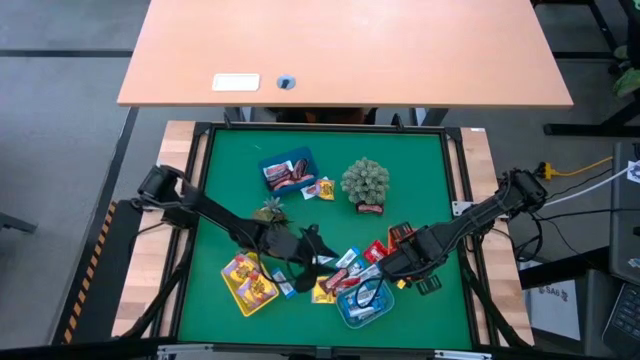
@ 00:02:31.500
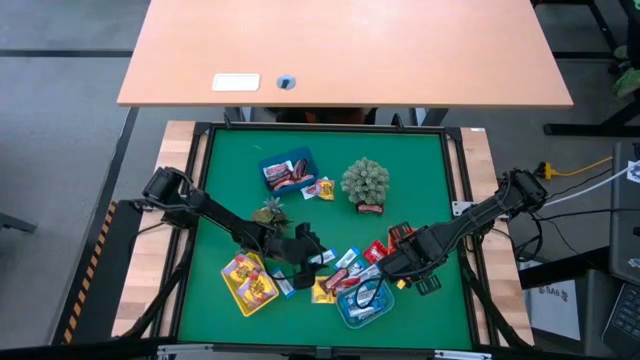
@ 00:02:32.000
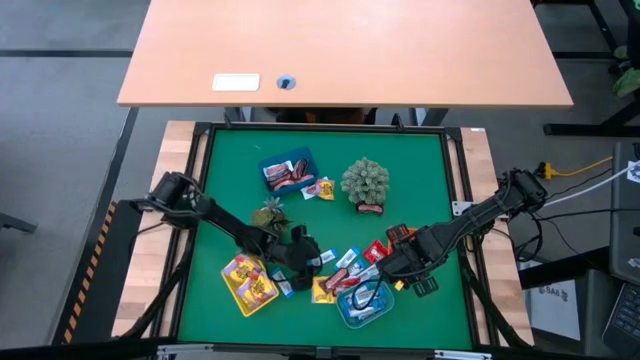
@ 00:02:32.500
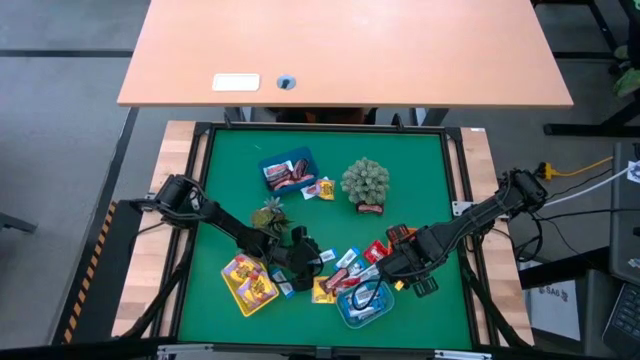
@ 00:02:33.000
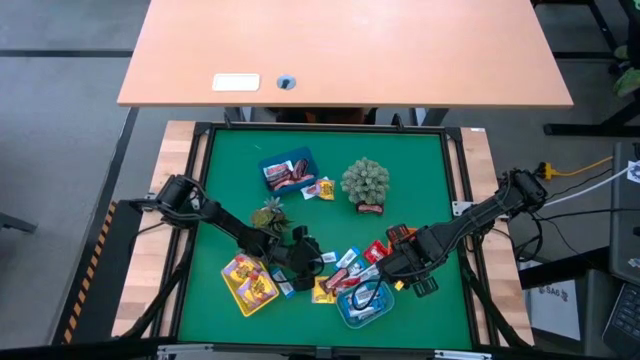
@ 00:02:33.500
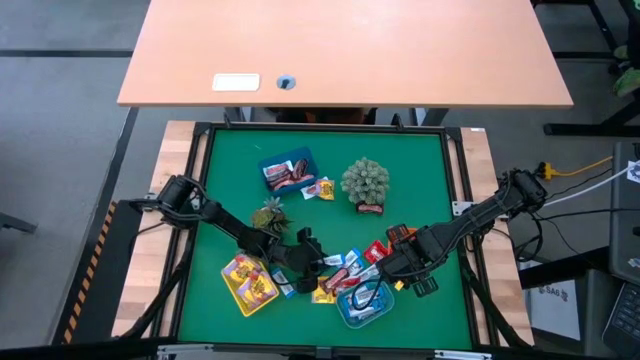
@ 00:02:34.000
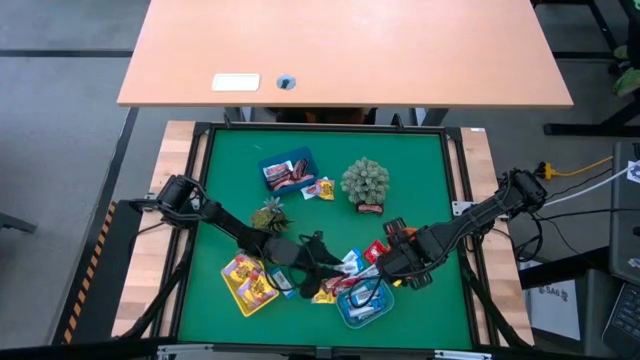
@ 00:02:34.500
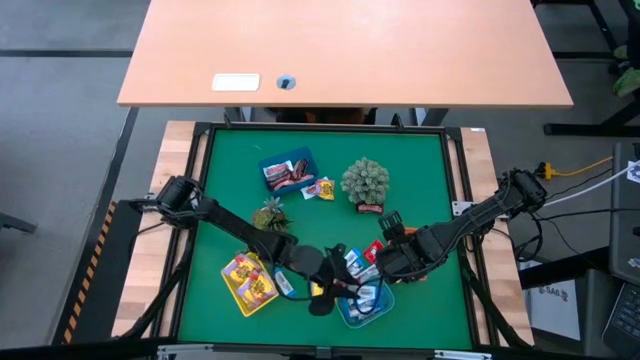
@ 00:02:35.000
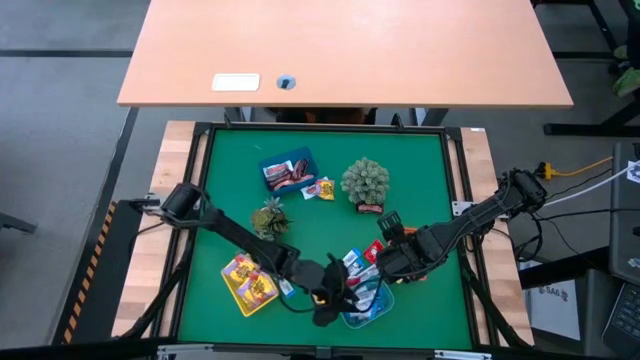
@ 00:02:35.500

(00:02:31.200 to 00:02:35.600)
Task: Sort candy
Put the white and blue candy into the light blue bin

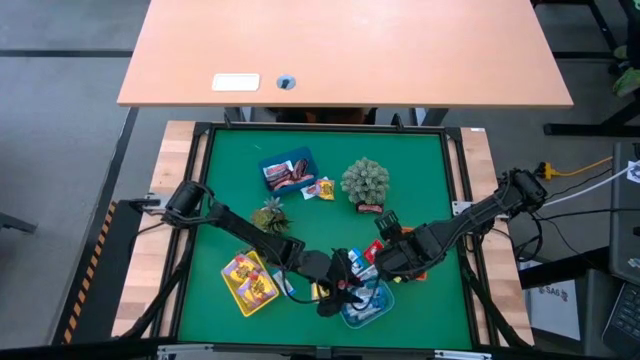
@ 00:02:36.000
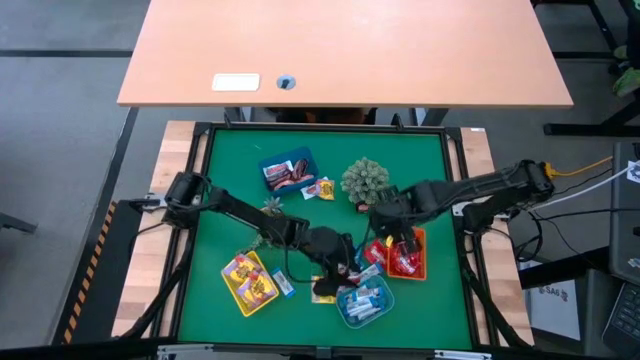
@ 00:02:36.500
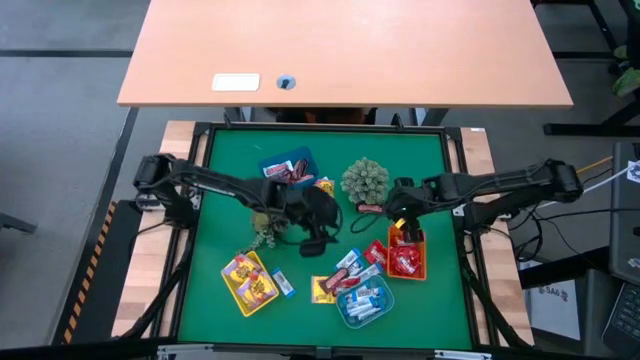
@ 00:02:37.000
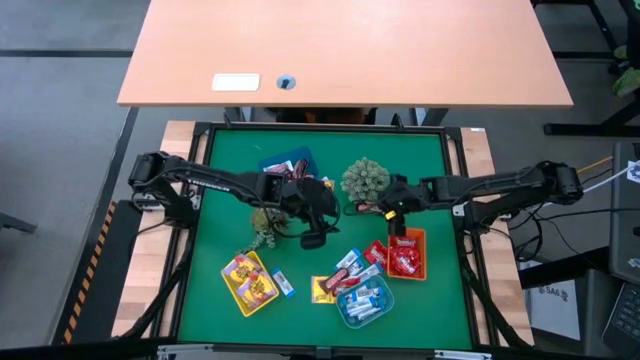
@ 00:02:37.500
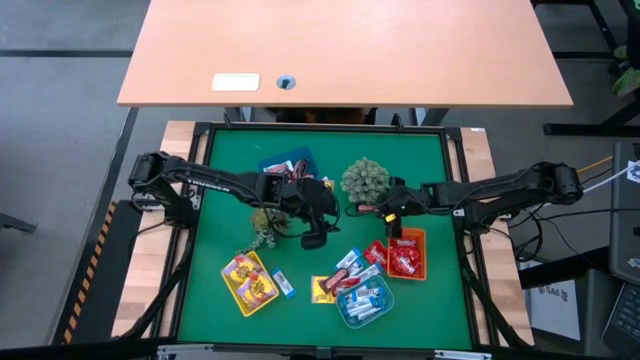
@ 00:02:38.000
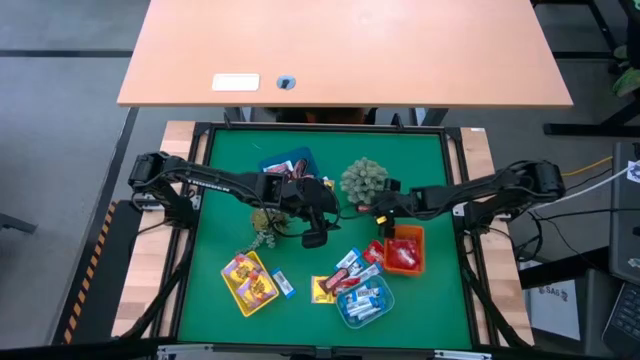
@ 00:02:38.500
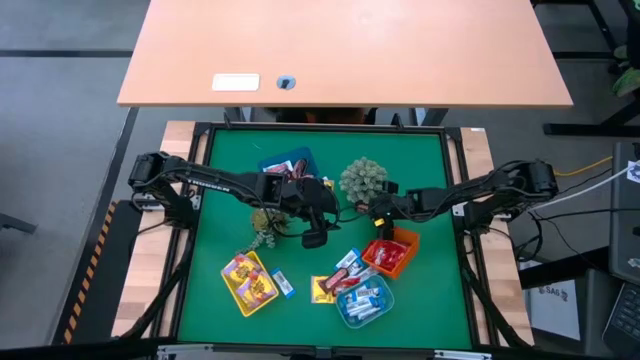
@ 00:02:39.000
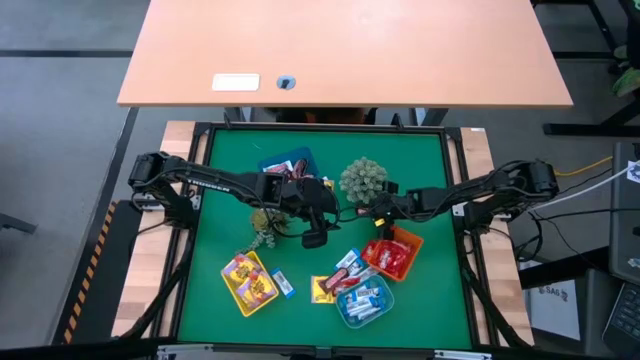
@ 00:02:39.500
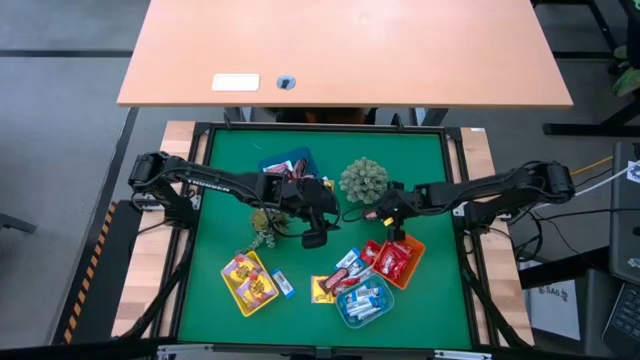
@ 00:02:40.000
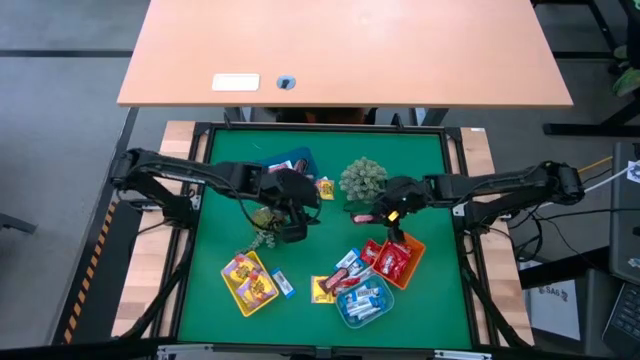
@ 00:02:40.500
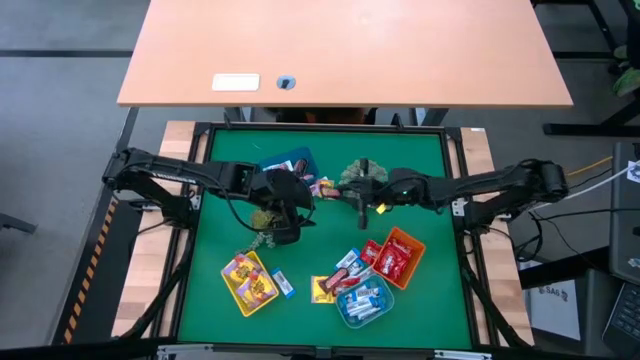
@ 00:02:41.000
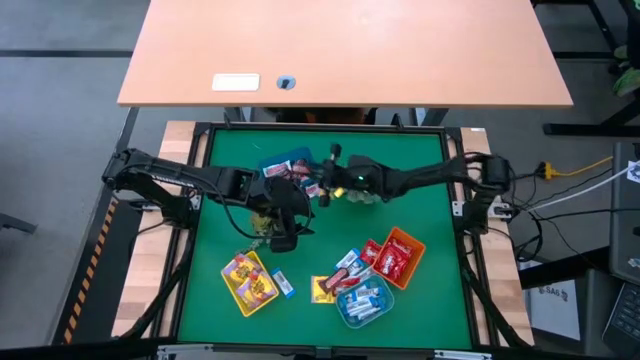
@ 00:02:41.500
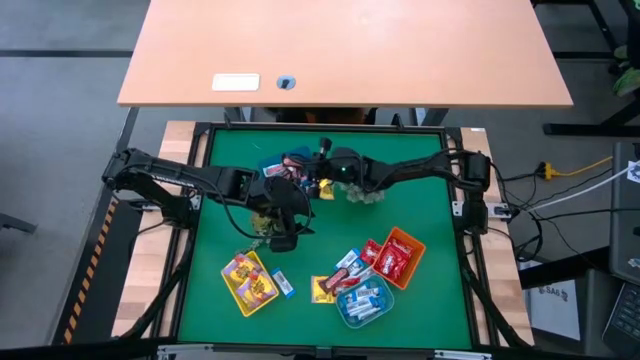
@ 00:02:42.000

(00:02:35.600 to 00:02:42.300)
Put the brown chocolate bar into the blue bin

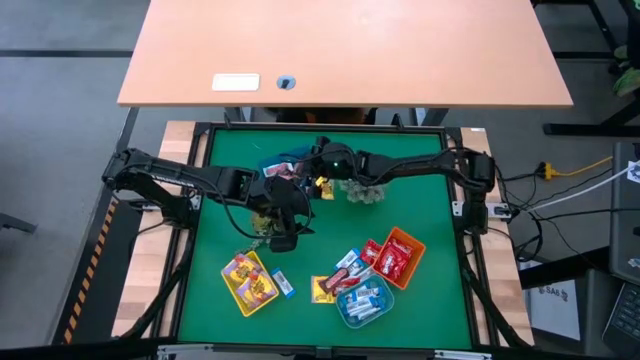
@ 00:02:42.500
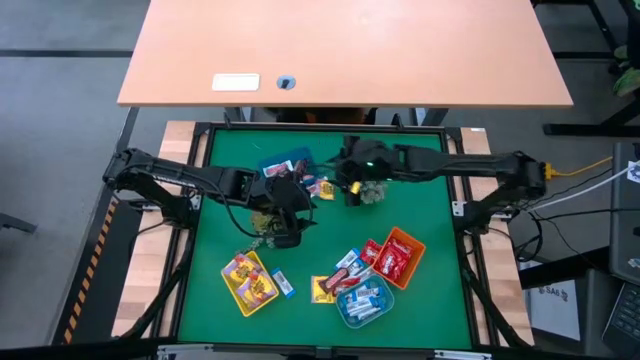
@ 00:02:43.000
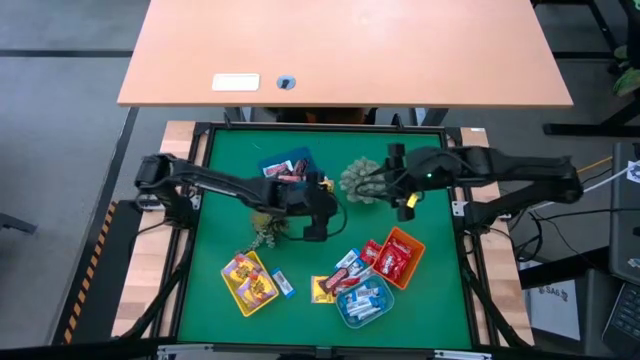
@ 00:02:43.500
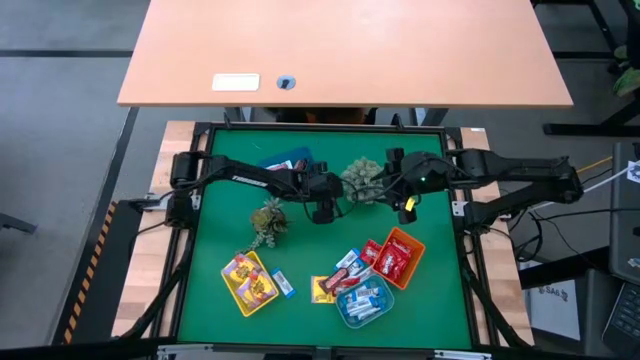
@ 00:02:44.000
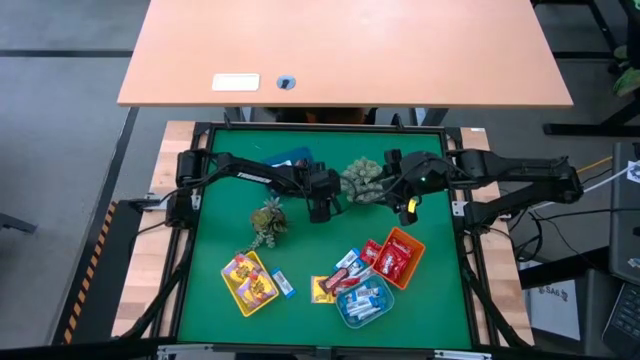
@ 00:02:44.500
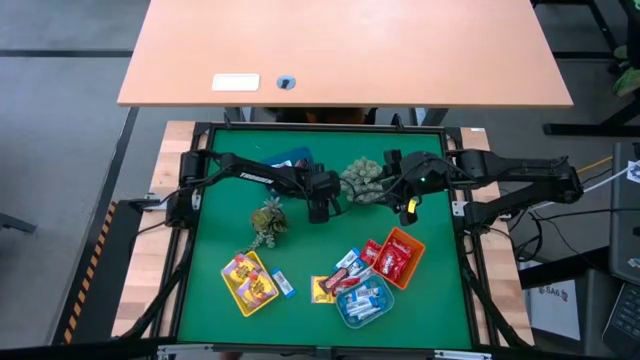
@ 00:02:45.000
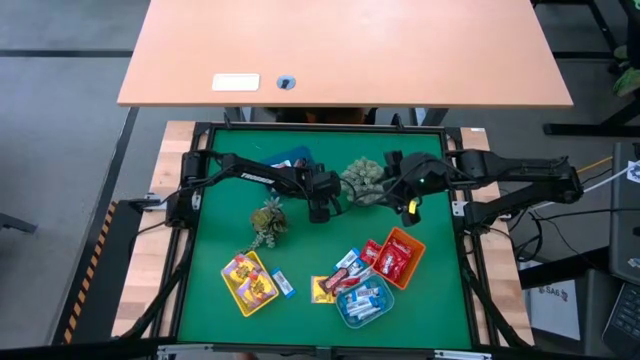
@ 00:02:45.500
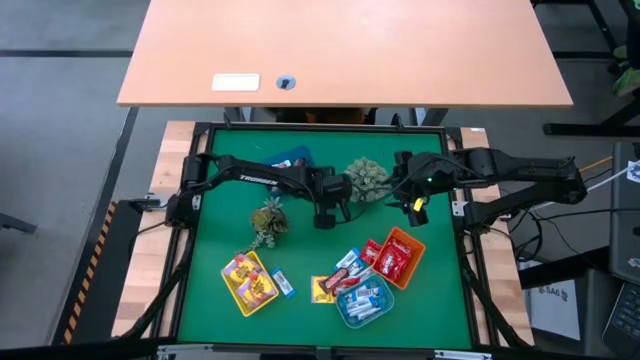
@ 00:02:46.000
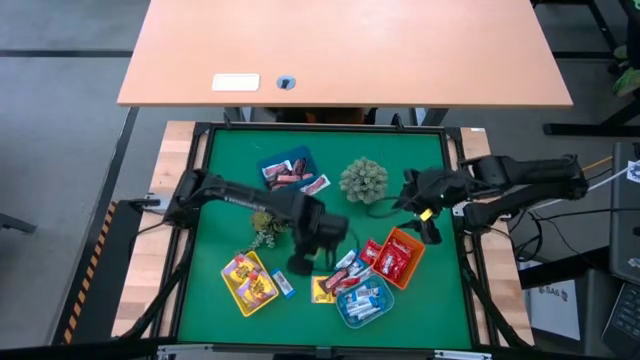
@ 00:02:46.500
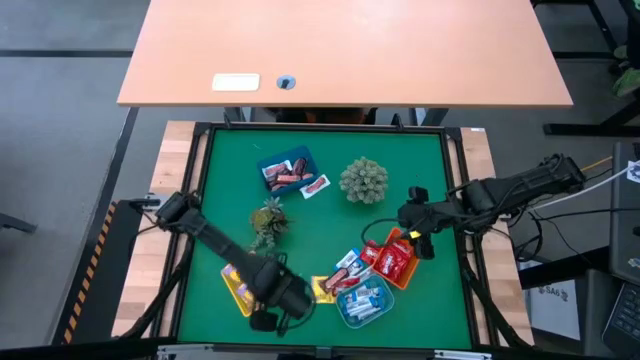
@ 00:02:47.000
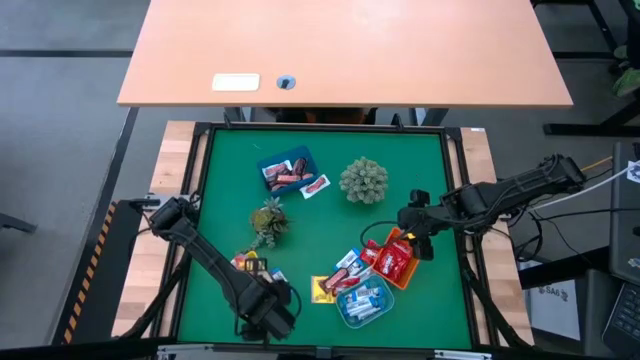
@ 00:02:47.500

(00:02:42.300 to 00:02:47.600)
Put the yellow candy into the yellow bin

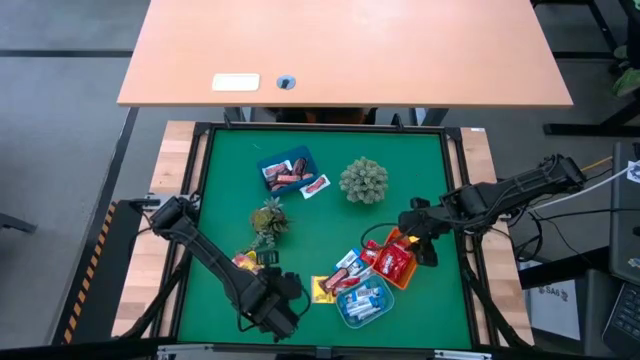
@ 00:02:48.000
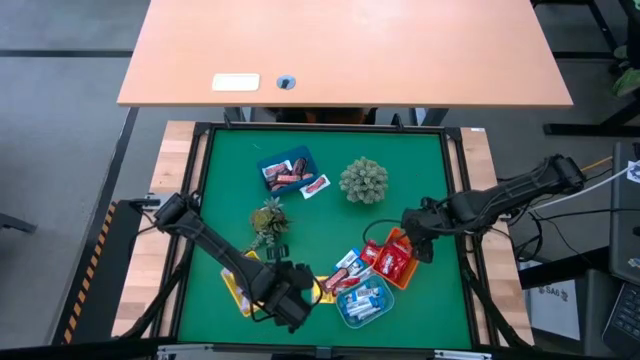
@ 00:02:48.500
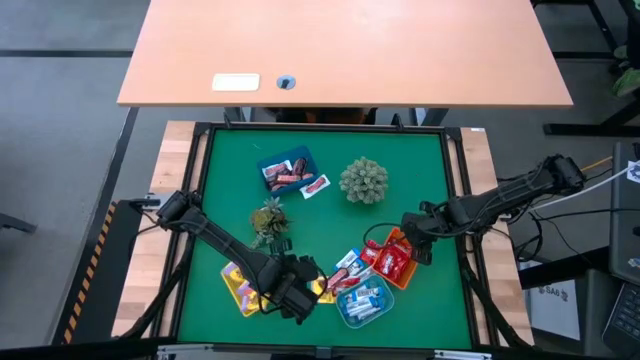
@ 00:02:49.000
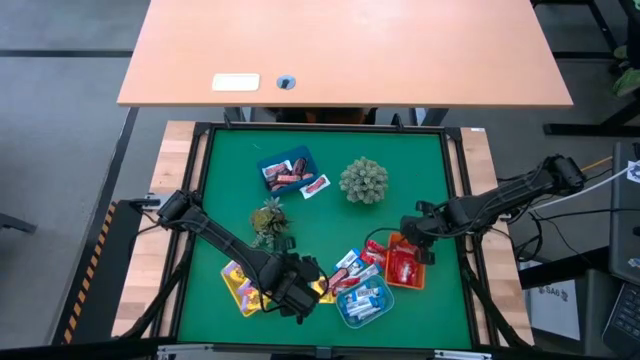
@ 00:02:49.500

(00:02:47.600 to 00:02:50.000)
Adjust the orange bin on the table

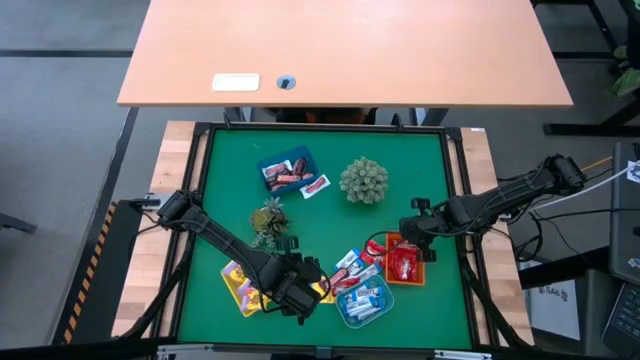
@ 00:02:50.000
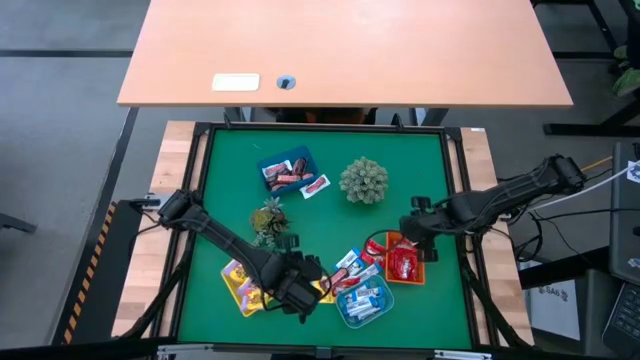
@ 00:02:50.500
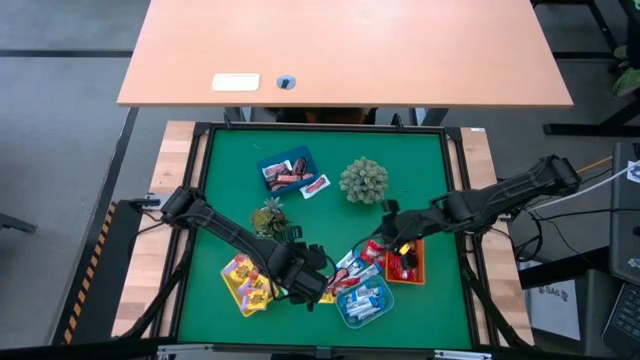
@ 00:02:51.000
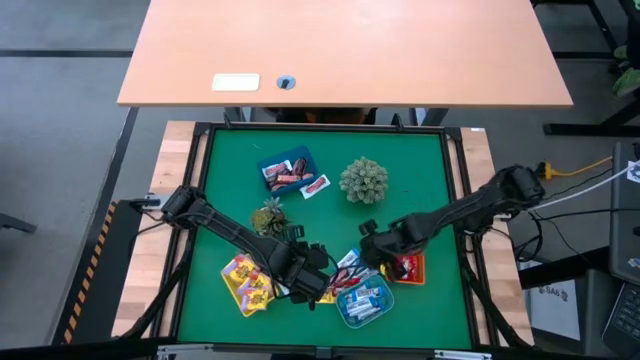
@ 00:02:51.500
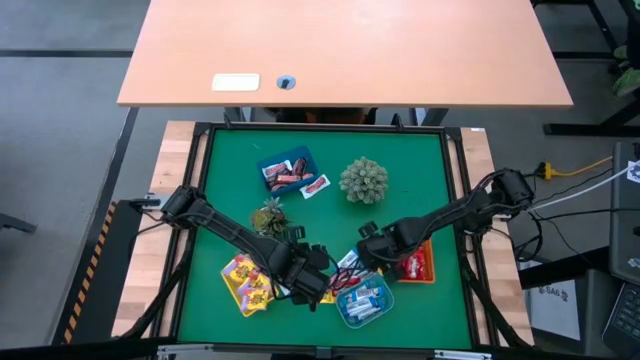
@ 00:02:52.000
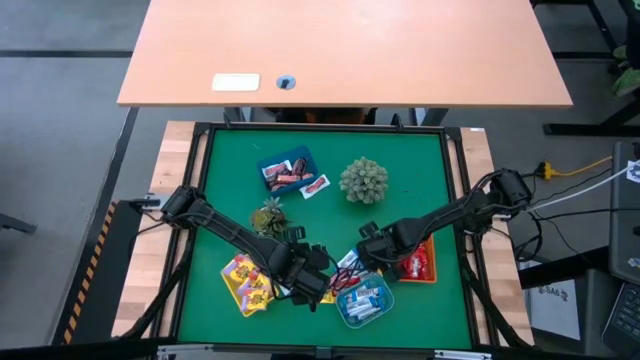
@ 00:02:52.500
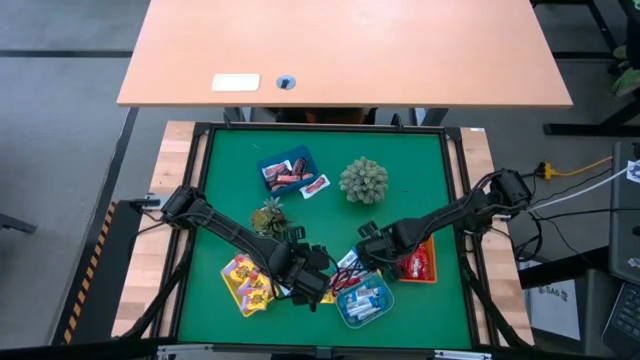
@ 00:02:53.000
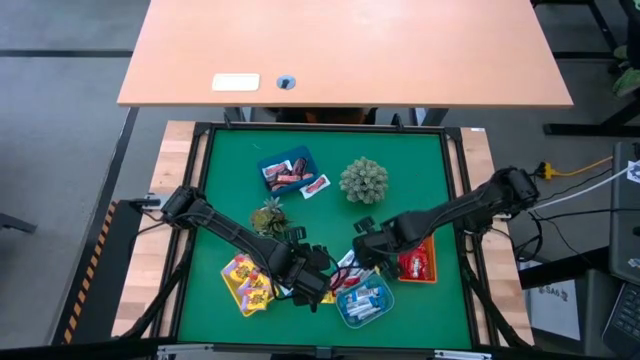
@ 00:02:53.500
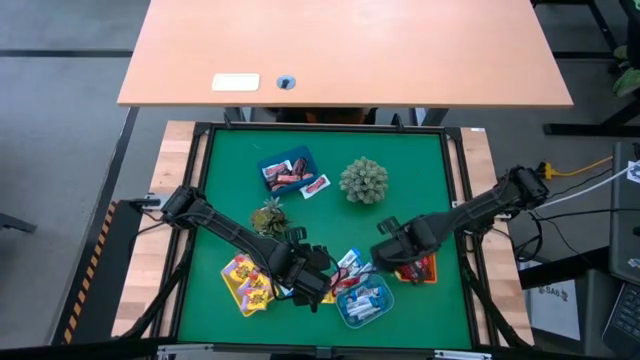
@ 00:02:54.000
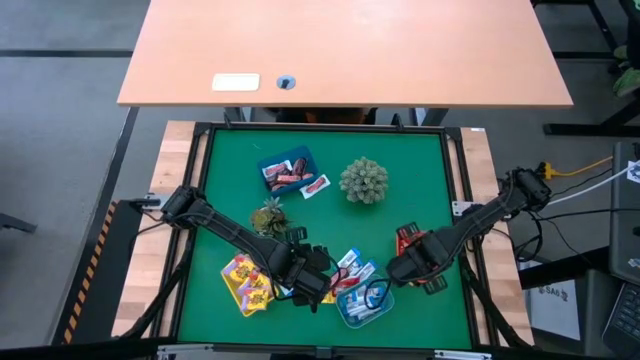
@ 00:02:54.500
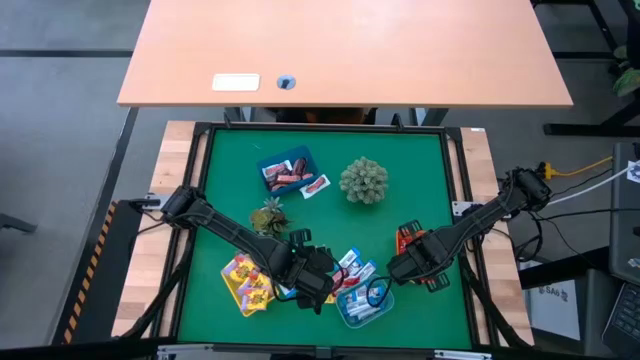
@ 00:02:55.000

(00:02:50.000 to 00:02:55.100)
Put the red candy into the orange bin
